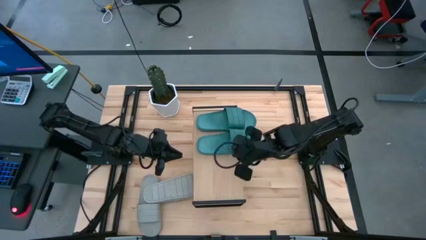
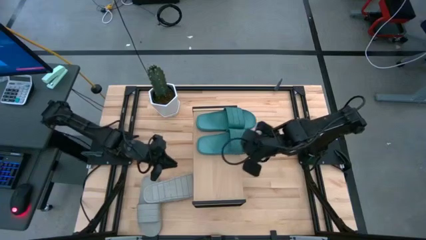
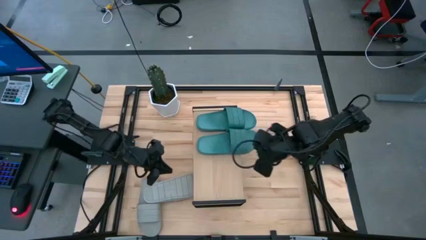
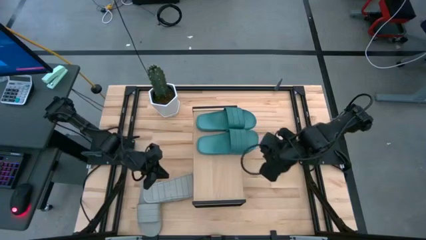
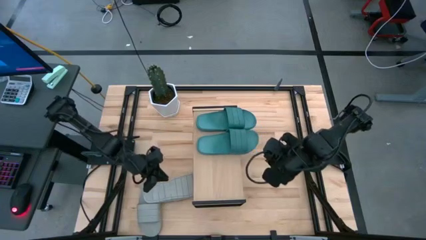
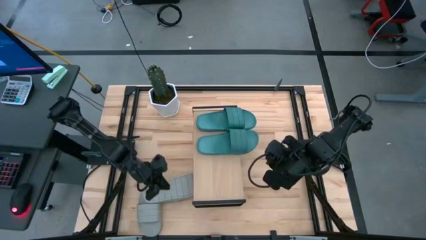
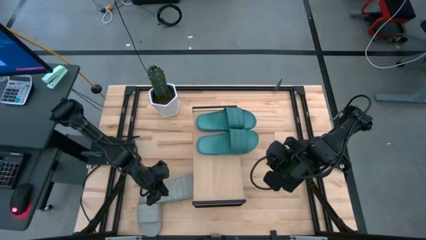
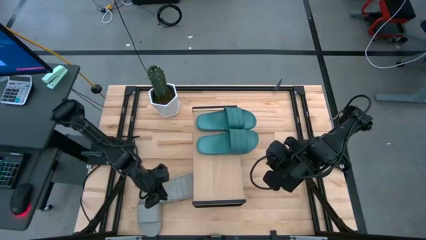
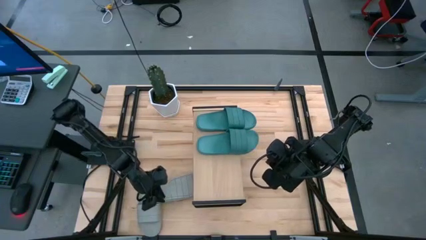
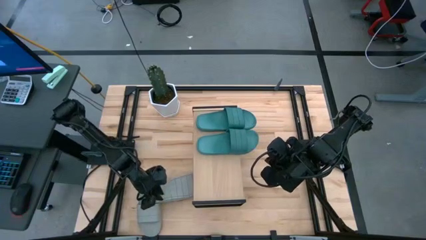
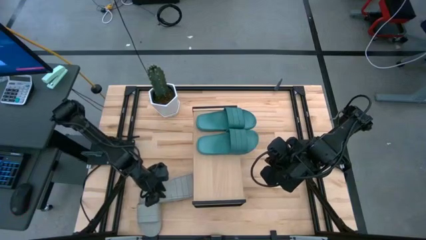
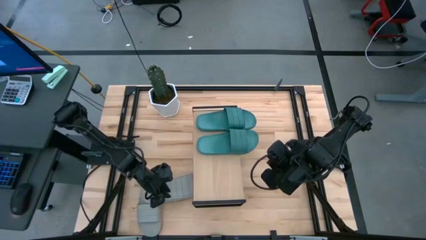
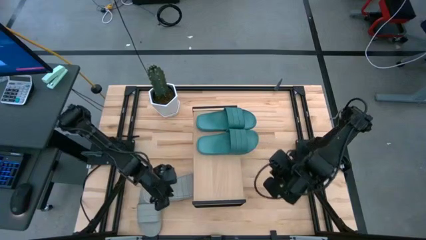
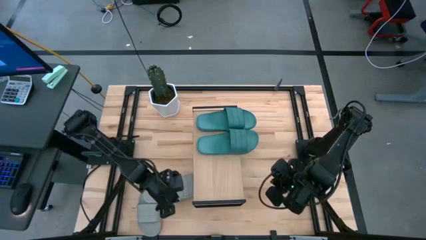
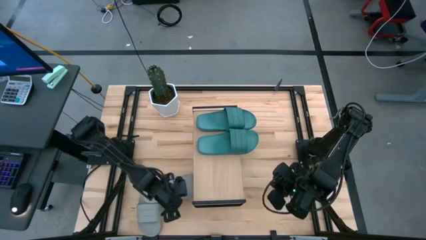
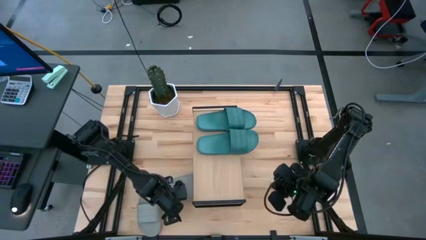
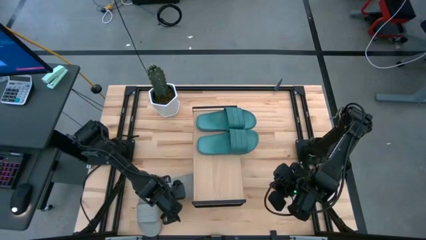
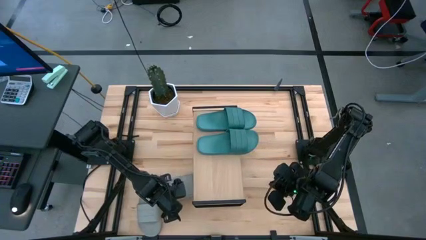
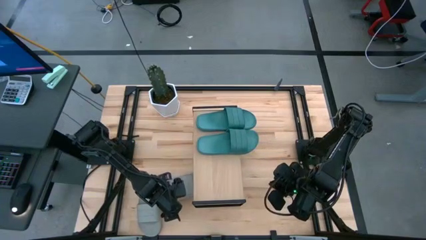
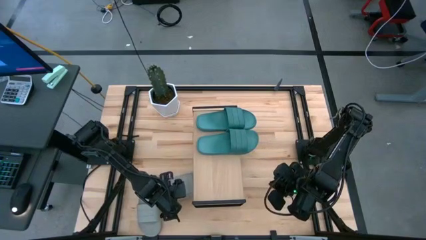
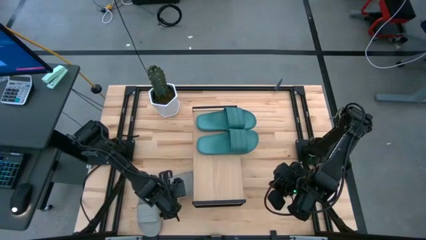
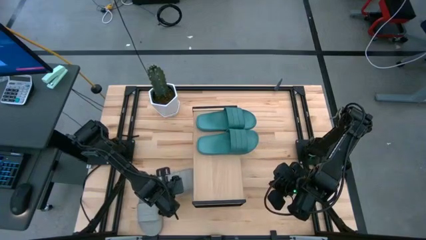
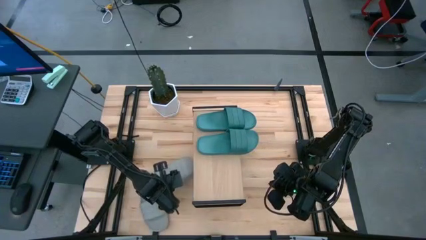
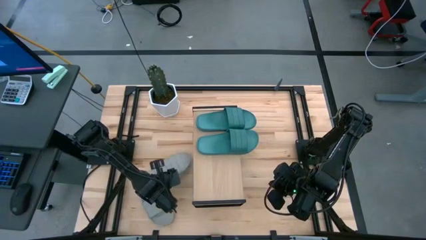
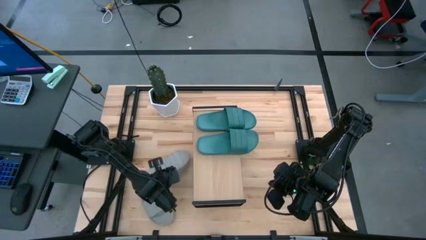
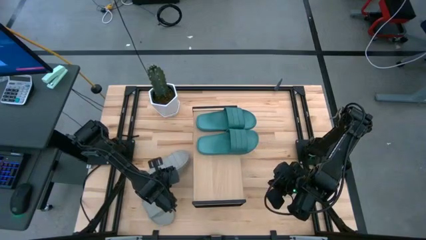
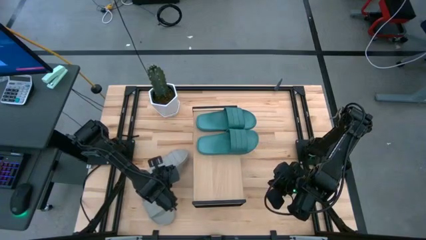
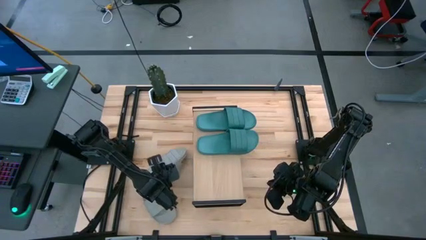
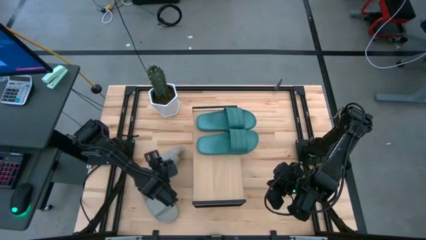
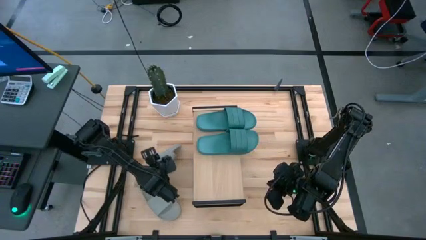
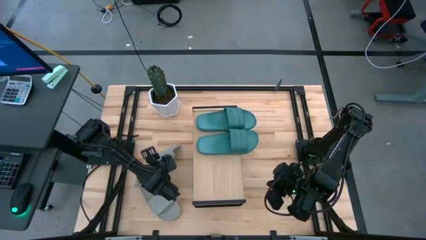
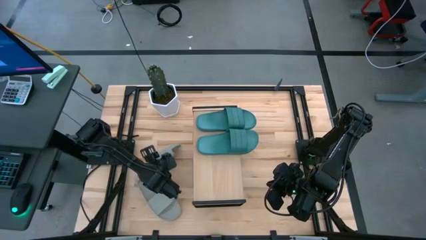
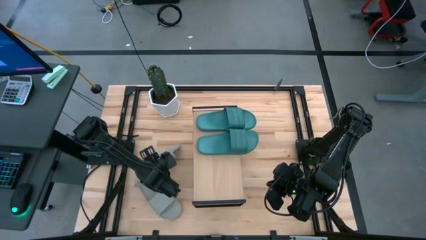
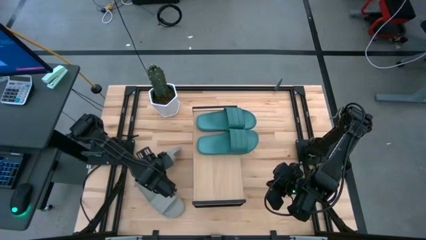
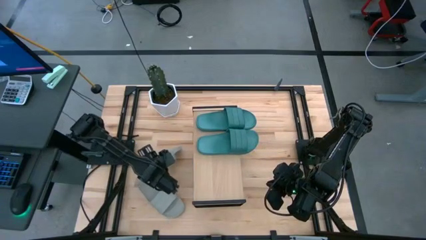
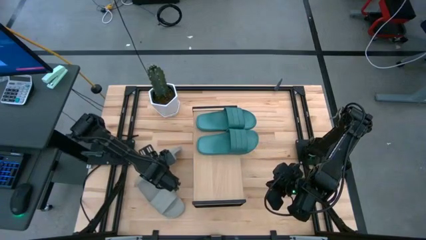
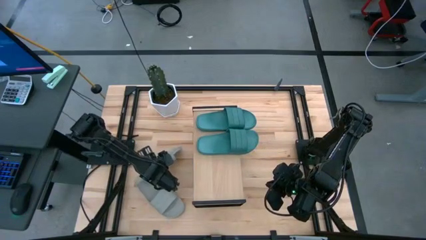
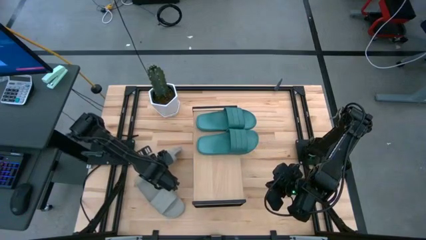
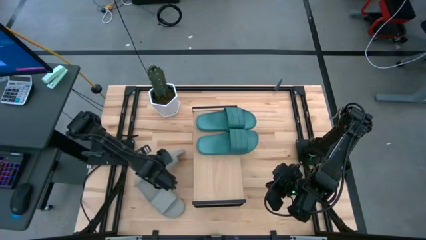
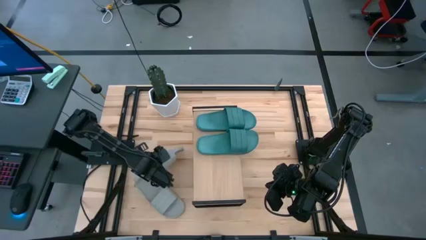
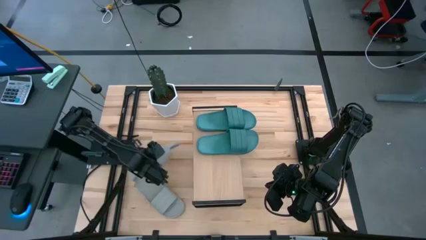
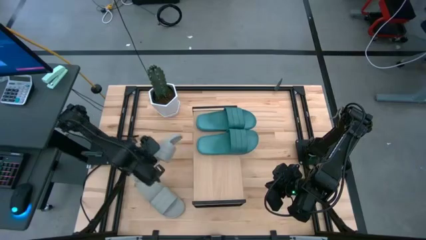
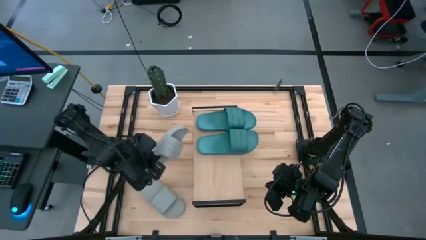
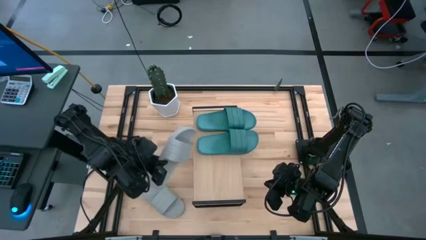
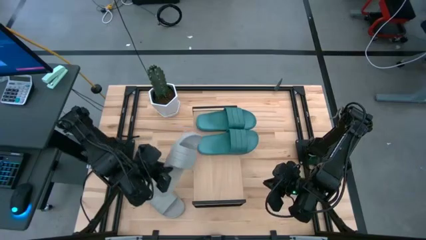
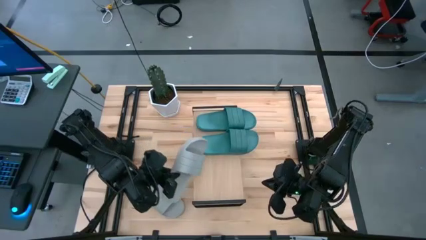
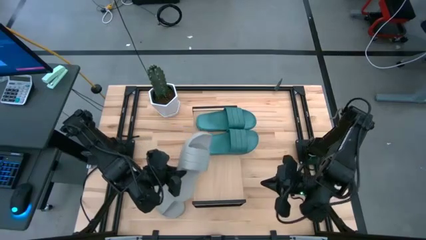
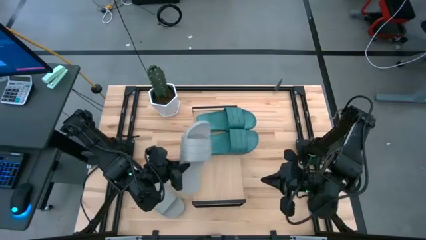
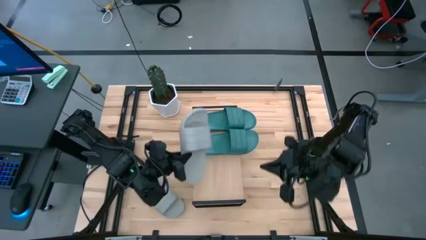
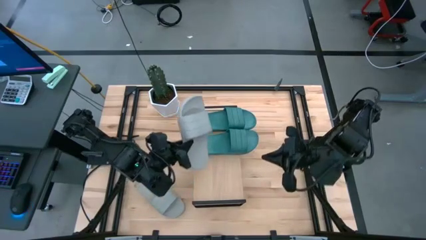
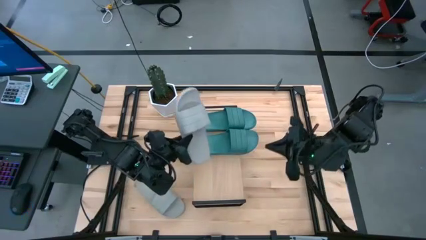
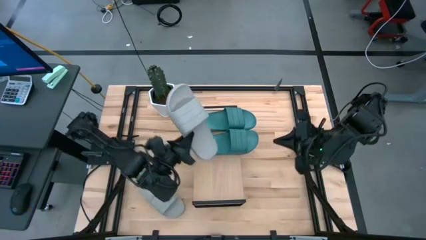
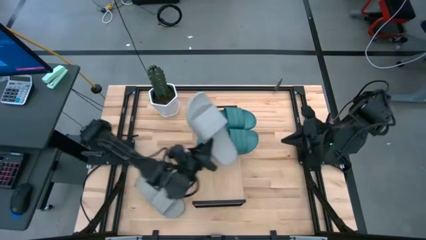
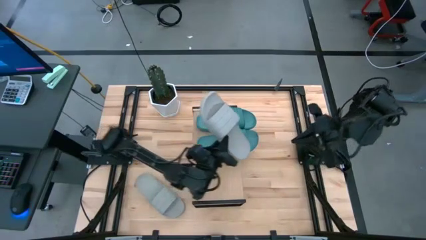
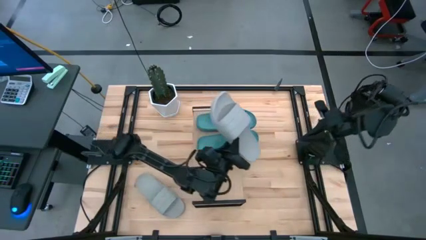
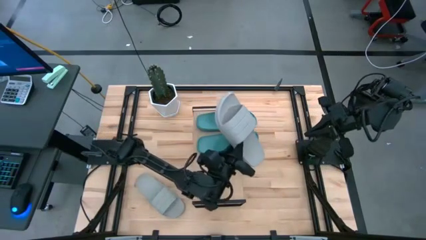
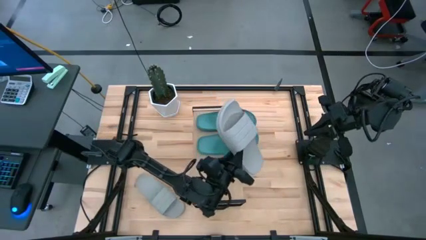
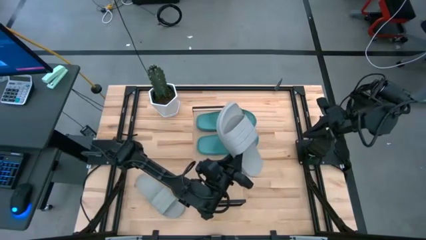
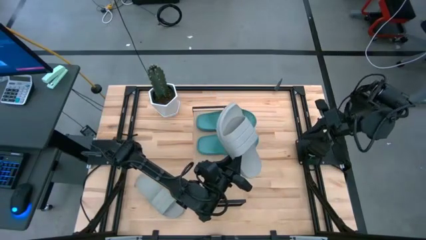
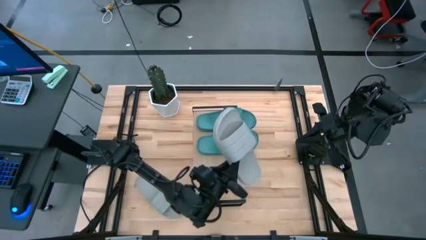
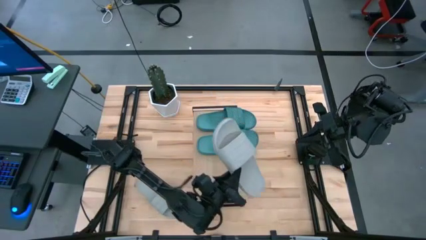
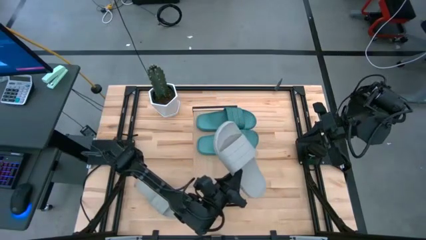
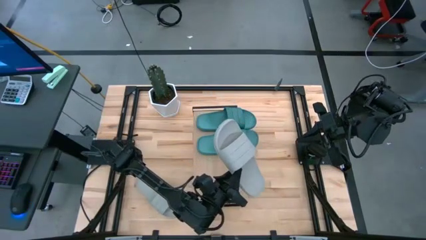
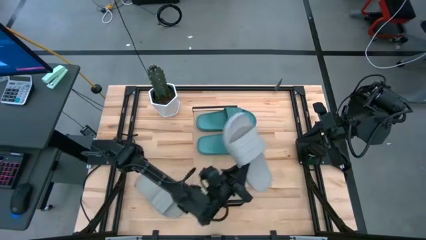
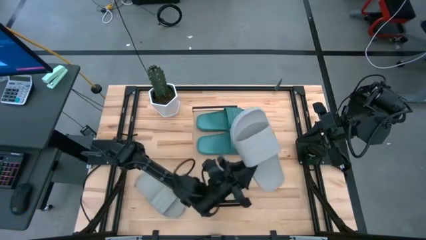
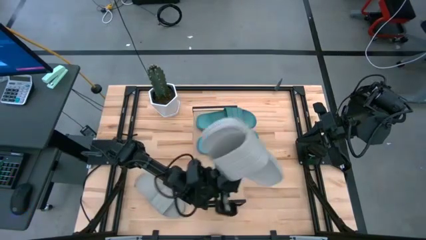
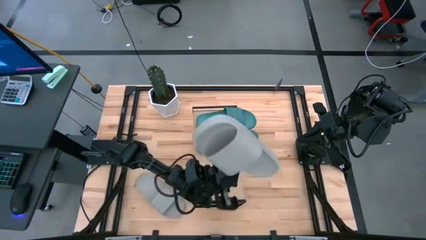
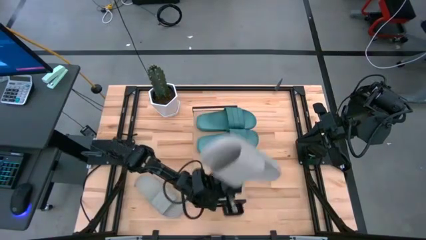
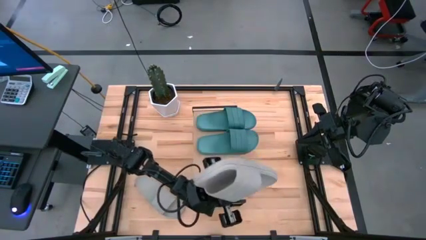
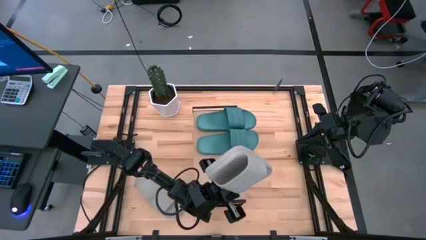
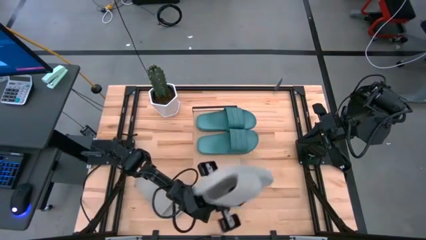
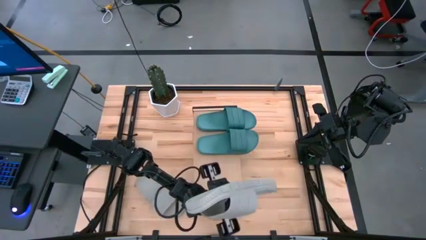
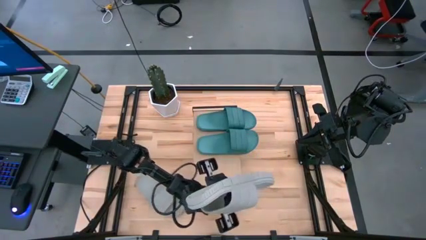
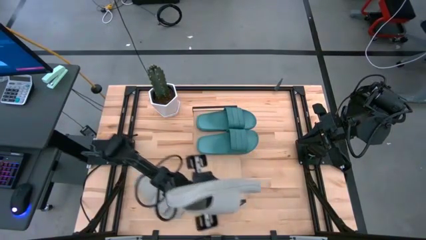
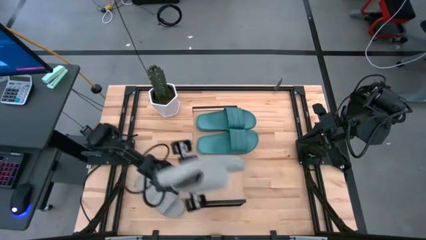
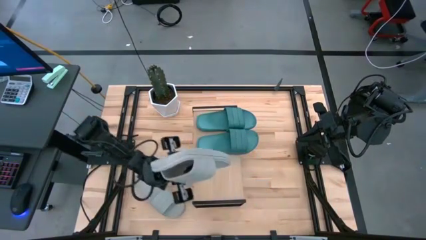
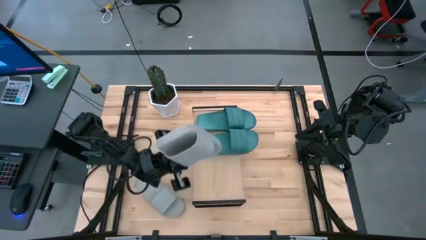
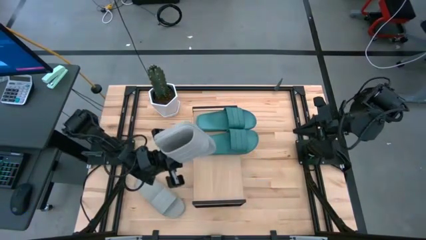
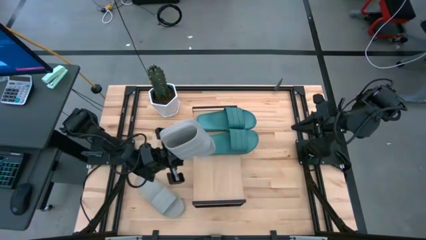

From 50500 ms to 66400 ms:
Task: Pick and place slides into the shelf
Put the right gray slide on the shelf
